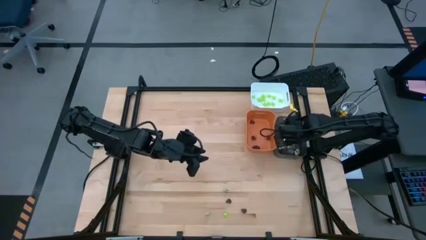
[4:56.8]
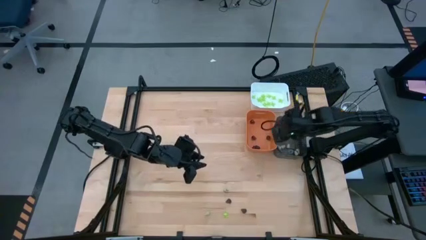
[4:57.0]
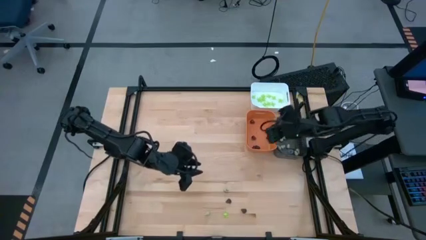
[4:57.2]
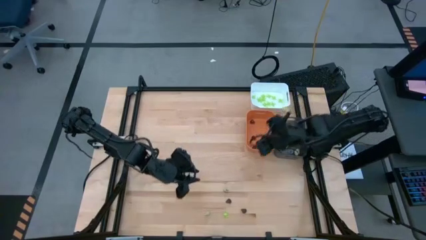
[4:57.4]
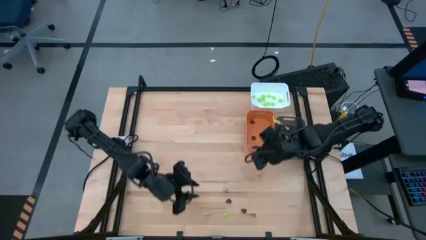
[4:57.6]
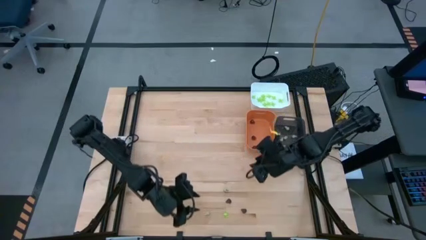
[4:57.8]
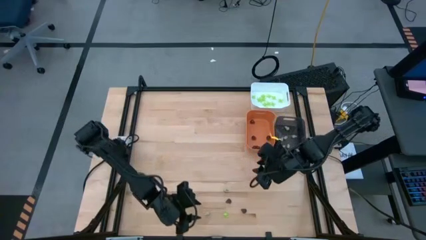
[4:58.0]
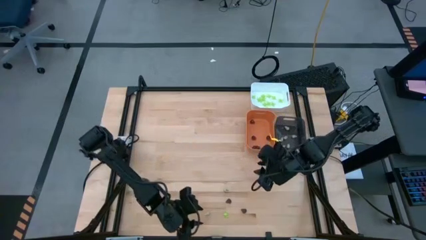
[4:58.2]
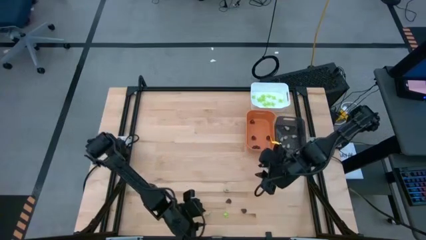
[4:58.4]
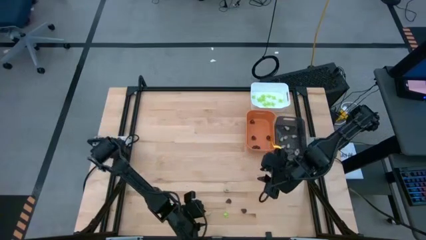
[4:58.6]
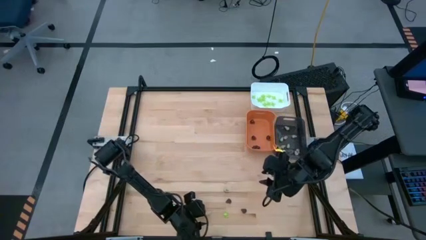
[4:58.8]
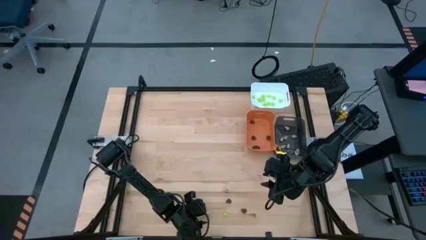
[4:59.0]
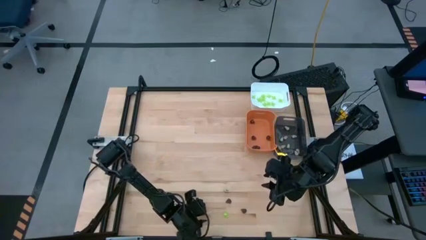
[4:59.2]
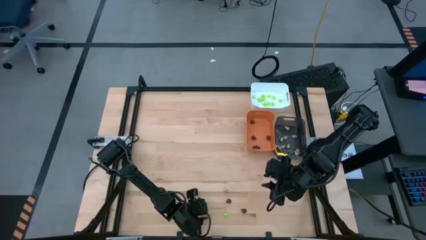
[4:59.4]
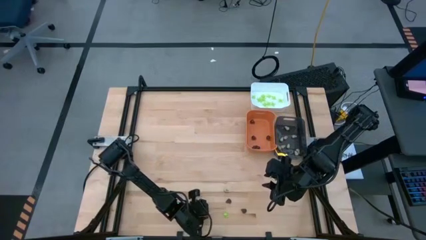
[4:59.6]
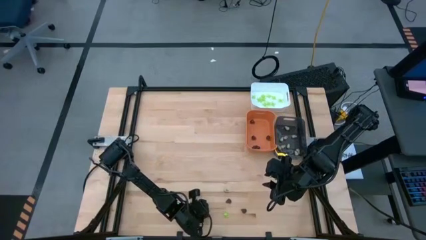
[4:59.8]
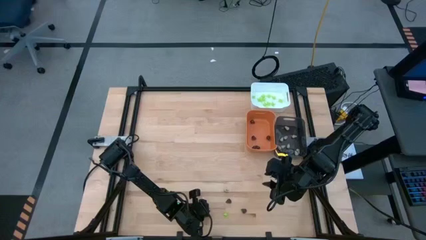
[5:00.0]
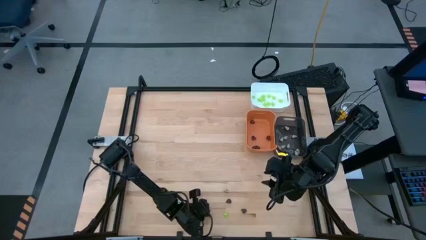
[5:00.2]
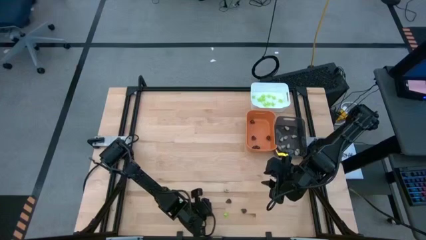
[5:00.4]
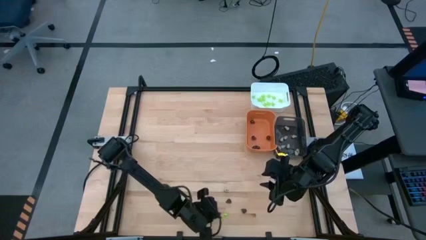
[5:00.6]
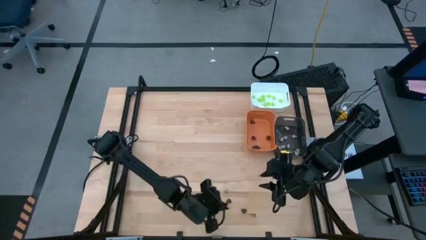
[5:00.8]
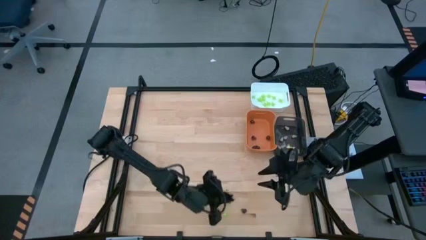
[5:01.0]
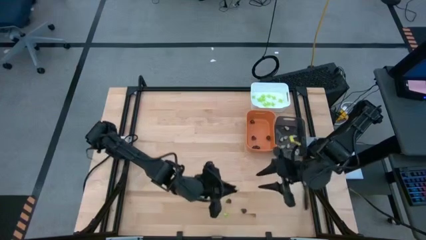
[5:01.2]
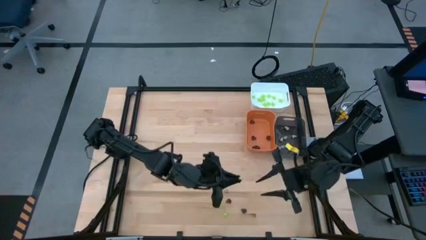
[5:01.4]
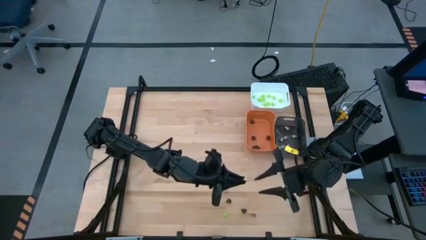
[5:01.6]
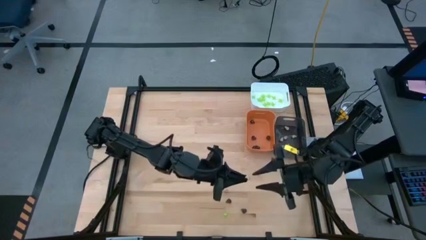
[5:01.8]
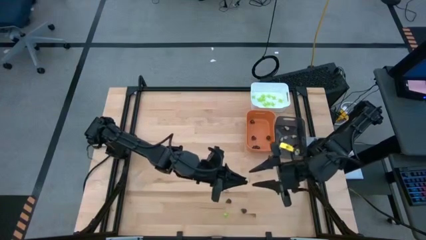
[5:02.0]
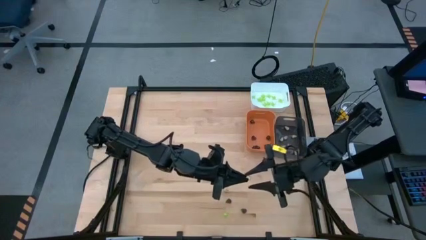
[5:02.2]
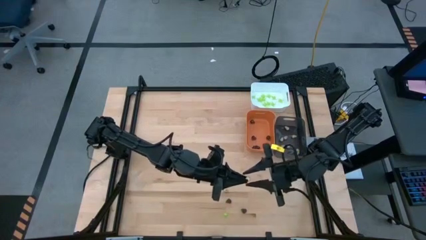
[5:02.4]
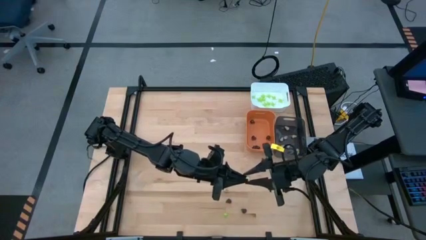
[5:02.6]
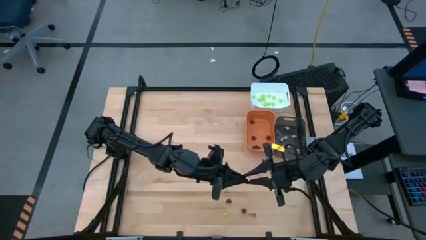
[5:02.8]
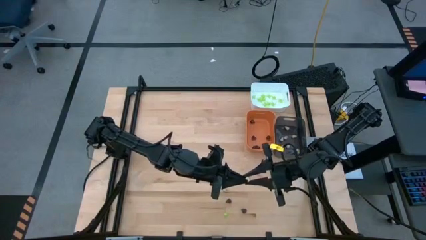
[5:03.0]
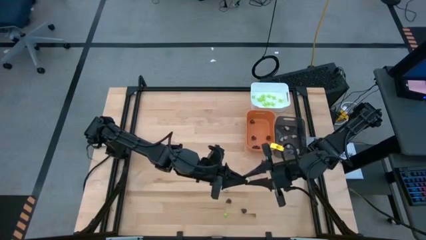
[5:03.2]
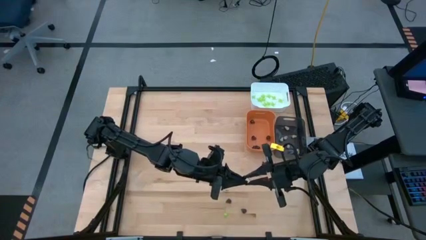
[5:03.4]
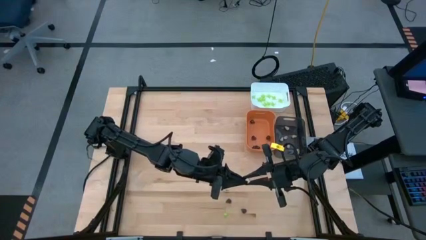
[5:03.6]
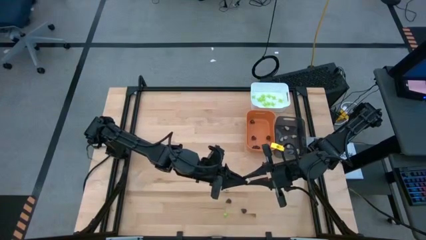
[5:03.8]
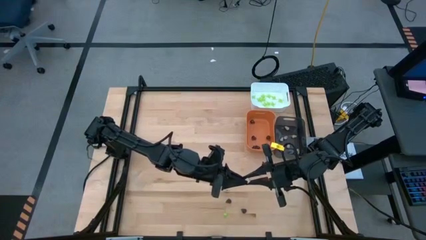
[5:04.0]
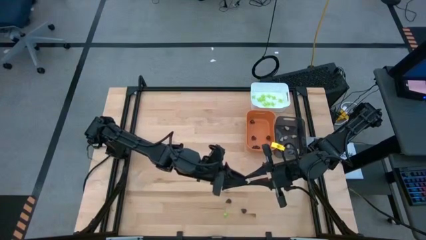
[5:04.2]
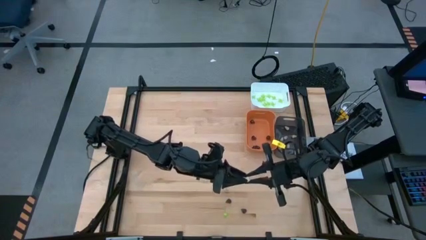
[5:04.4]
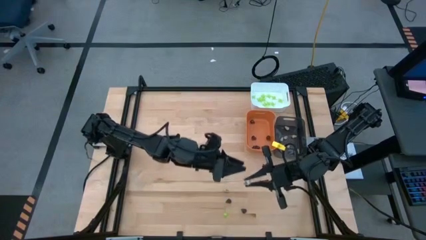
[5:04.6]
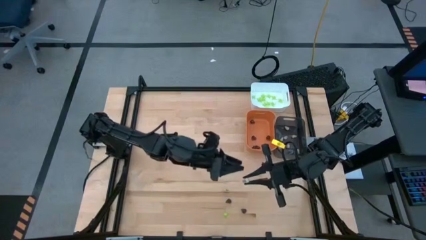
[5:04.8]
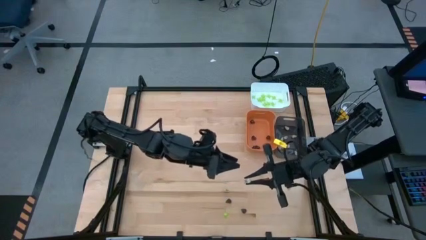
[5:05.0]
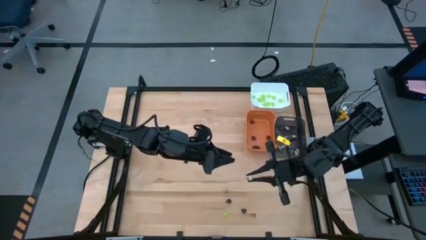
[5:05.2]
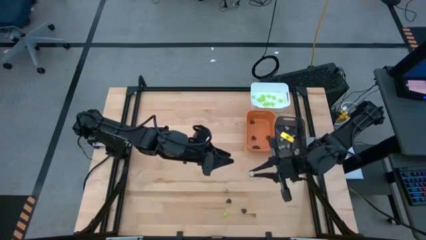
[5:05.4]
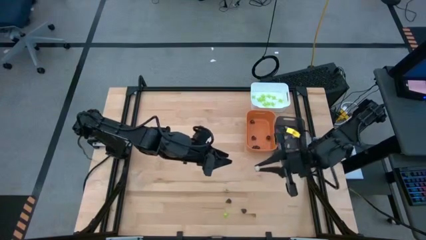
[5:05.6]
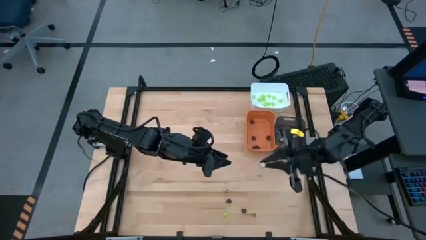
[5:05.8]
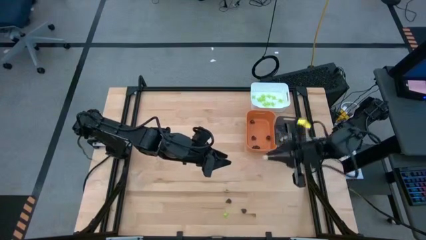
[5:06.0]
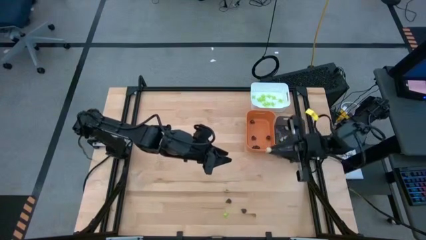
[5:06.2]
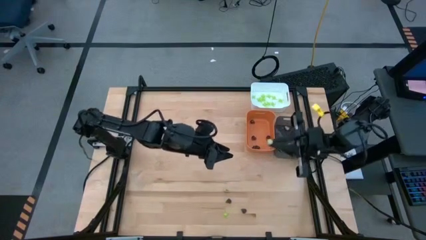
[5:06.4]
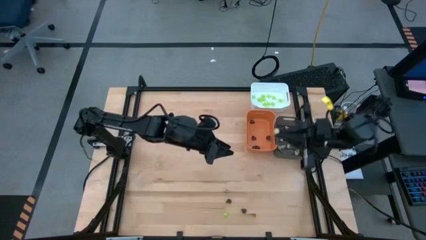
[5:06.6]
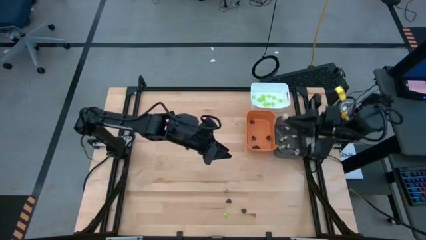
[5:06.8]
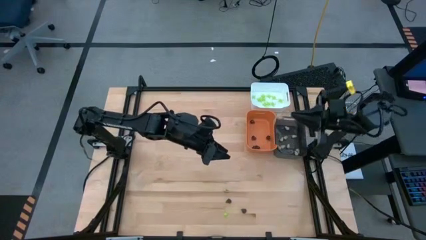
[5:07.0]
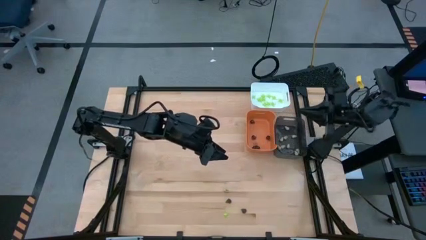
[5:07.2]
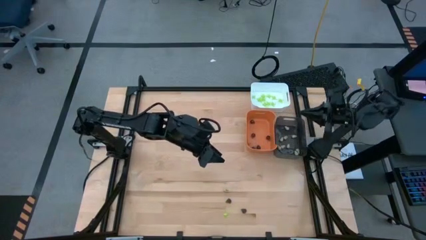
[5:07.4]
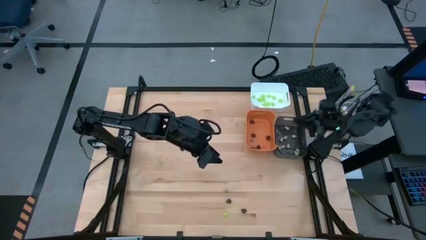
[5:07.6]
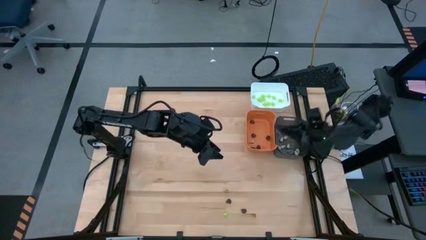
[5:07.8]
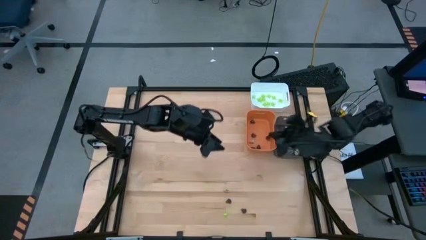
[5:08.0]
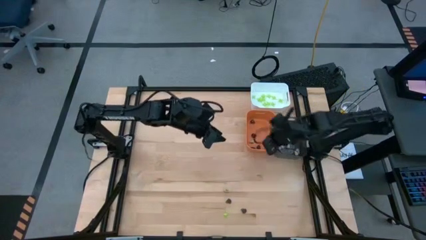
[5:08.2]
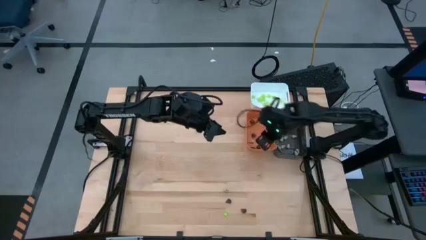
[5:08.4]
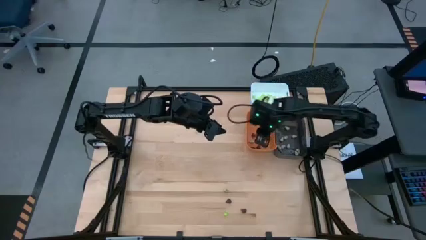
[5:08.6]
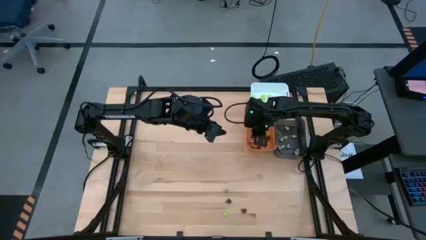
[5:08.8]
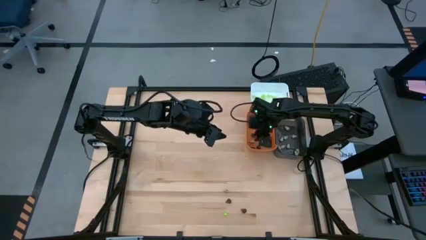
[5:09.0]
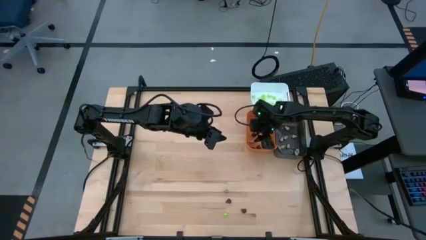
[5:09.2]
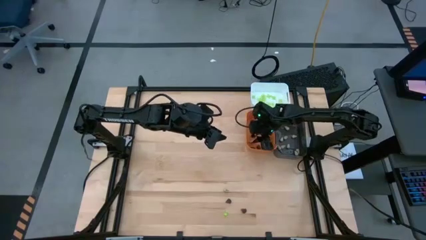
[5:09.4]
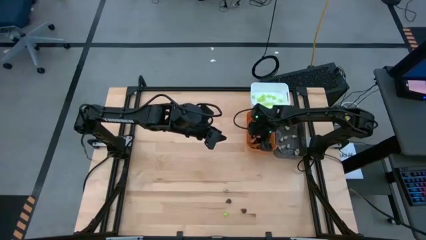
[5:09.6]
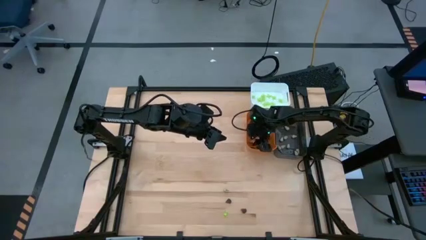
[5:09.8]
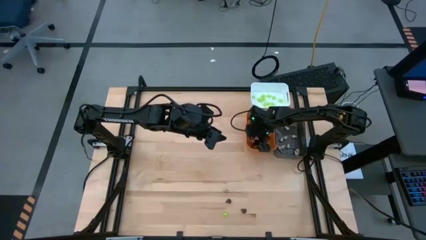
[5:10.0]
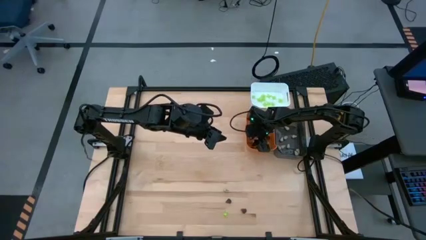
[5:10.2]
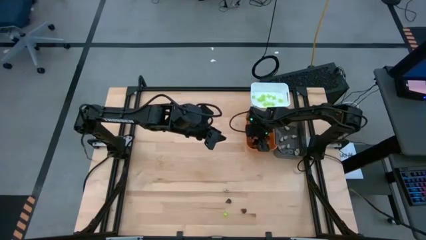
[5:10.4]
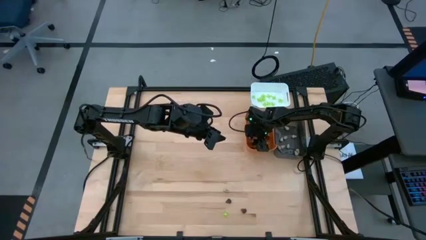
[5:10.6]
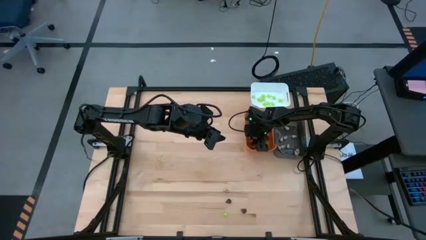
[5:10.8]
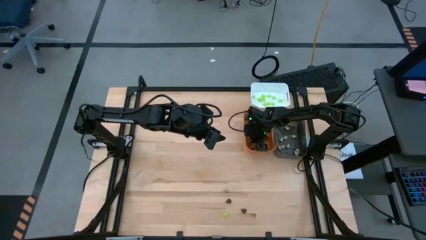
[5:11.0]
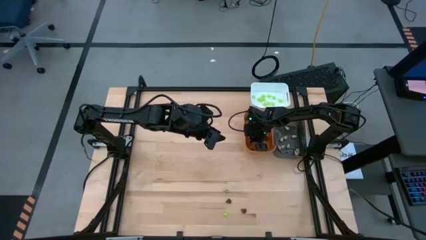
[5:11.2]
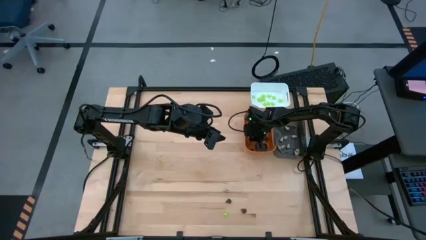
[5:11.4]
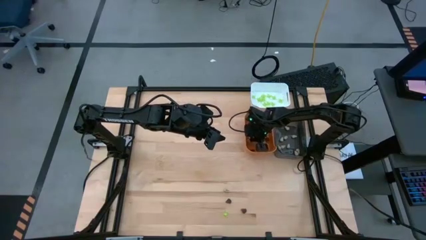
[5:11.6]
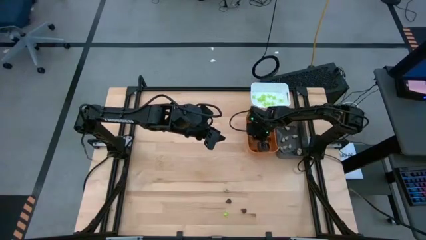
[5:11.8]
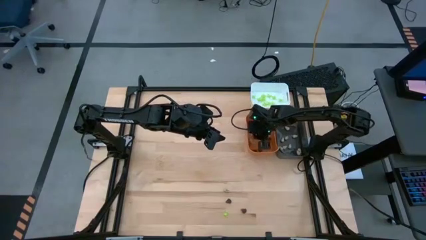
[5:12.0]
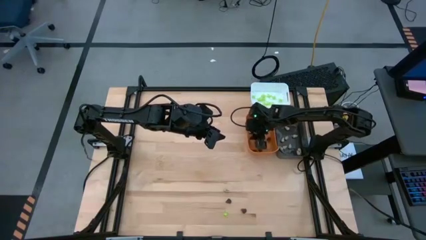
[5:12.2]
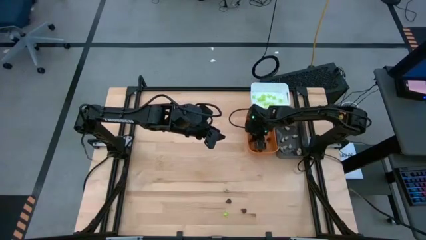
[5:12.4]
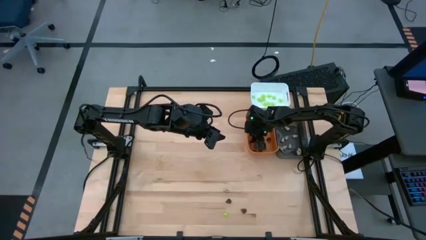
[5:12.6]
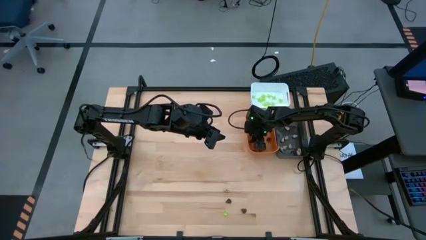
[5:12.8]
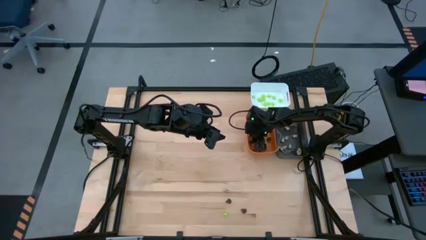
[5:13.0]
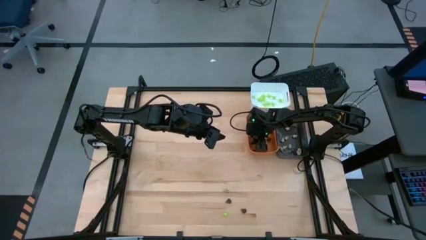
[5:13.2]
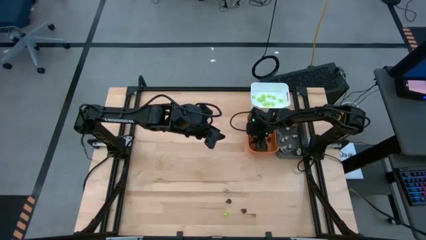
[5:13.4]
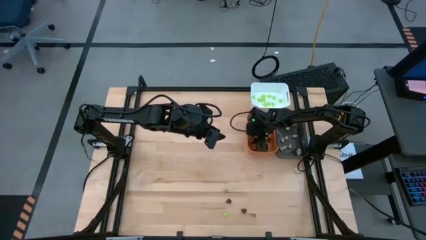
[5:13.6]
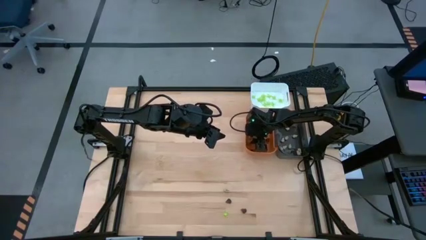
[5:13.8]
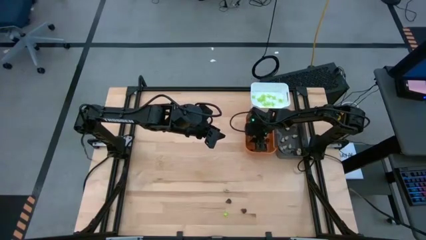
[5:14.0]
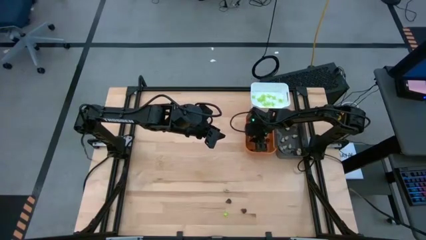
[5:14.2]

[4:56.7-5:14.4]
Task: Sort Halloween decoration
Put the white skull toy into the black bin
